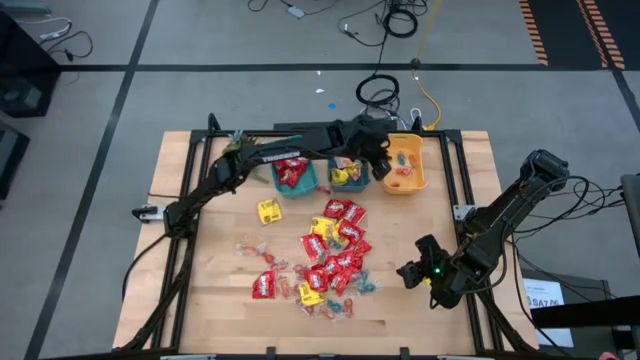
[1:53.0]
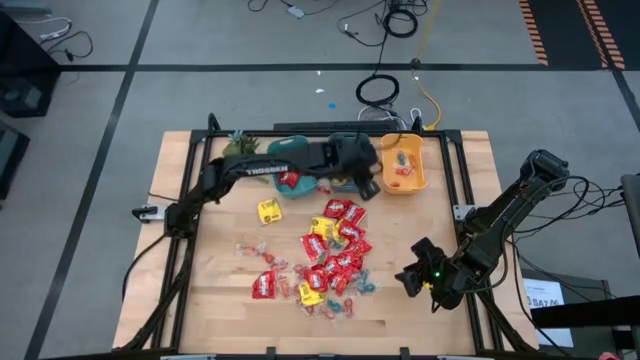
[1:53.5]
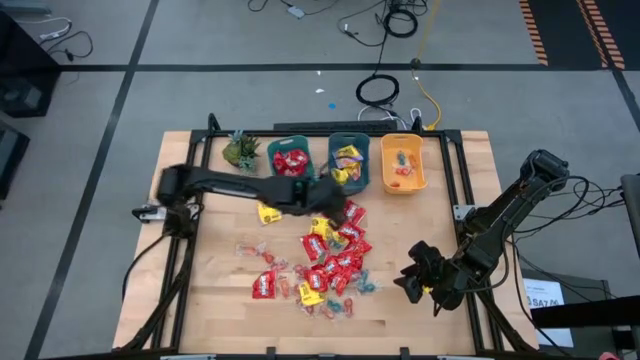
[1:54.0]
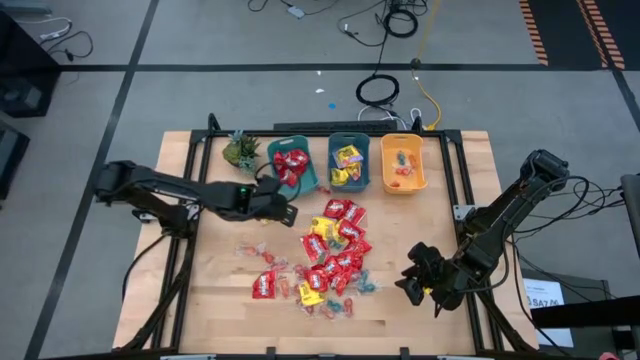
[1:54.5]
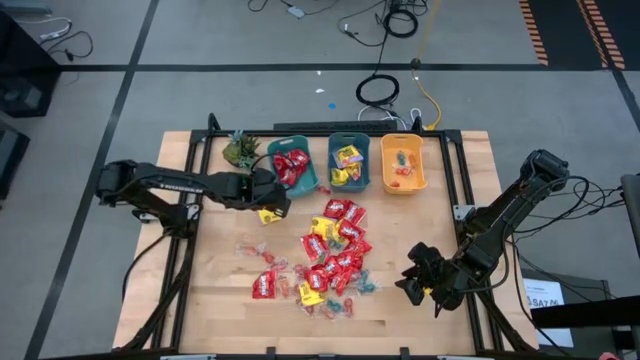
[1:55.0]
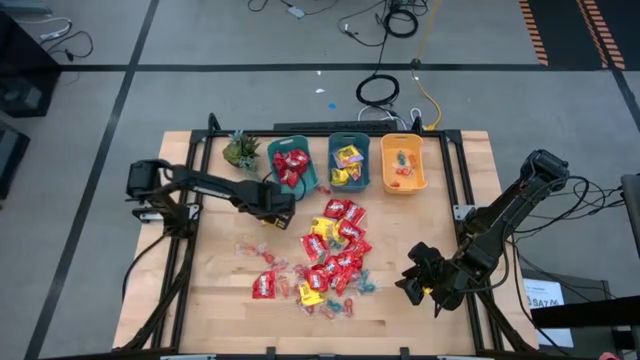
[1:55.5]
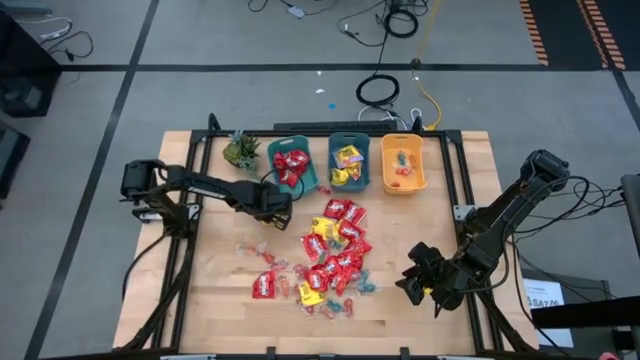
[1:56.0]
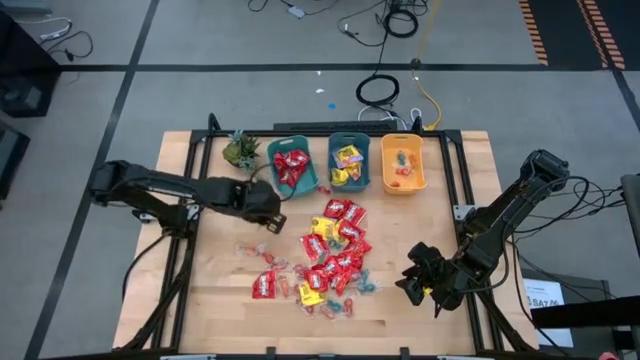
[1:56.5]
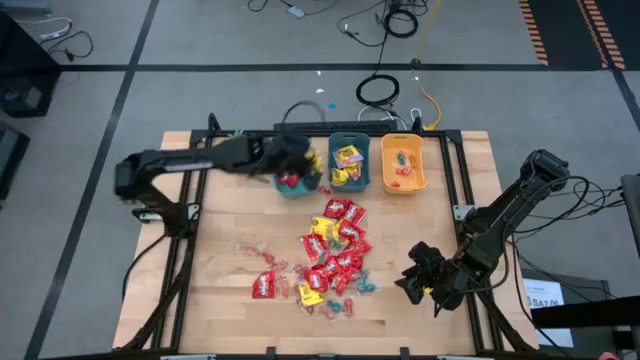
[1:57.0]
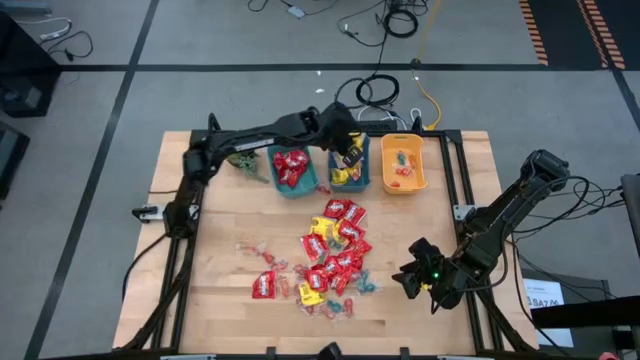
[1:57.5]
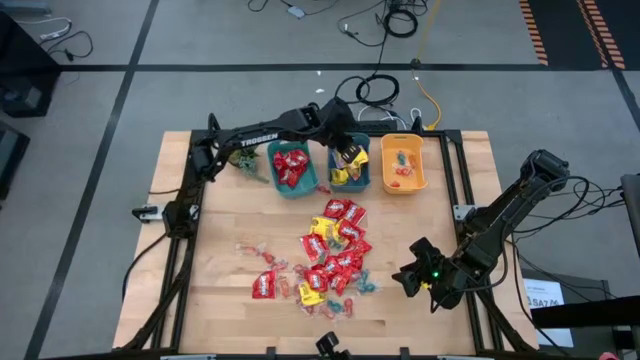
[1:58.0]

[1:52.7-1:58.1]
Task: Sort candy
Put the yellow candy into the blue bin

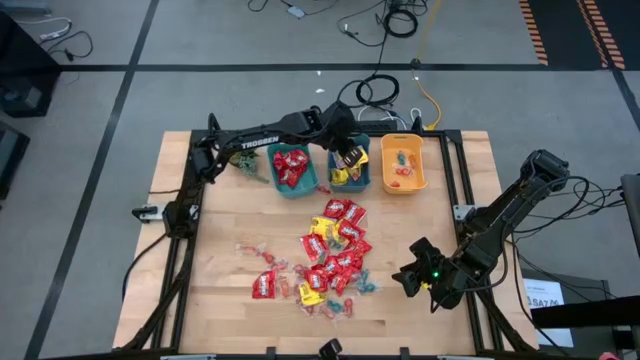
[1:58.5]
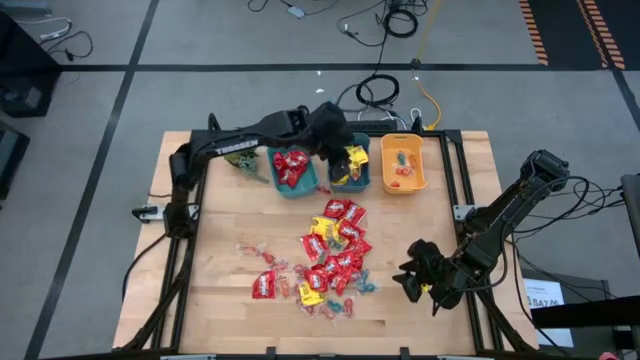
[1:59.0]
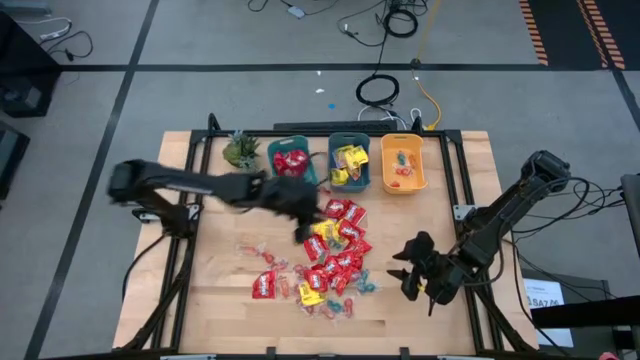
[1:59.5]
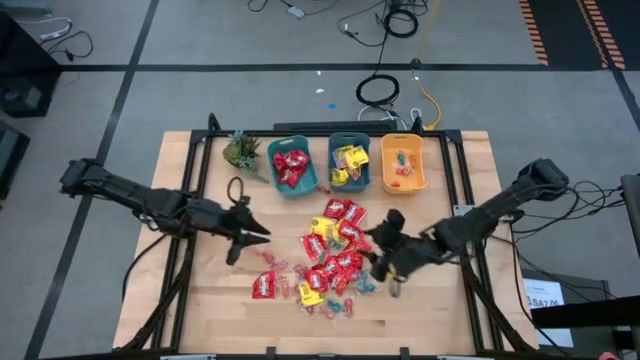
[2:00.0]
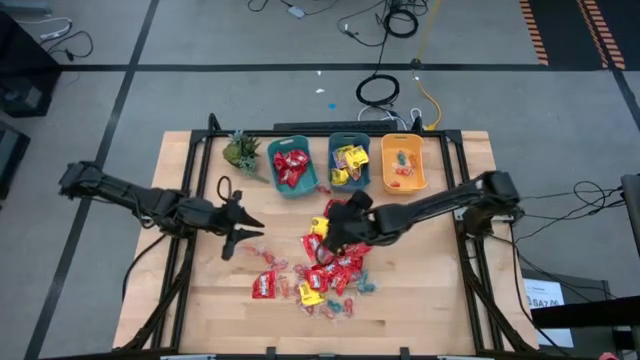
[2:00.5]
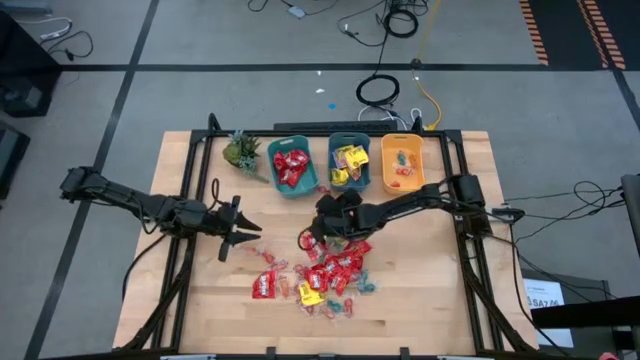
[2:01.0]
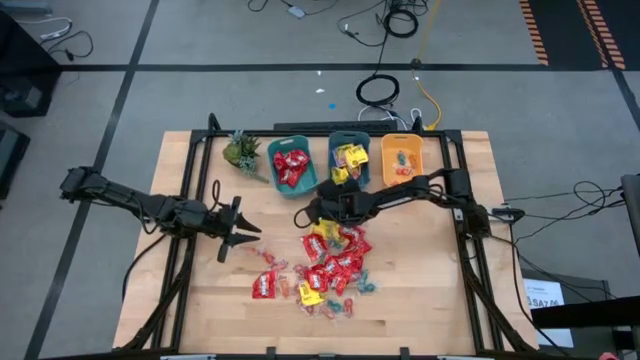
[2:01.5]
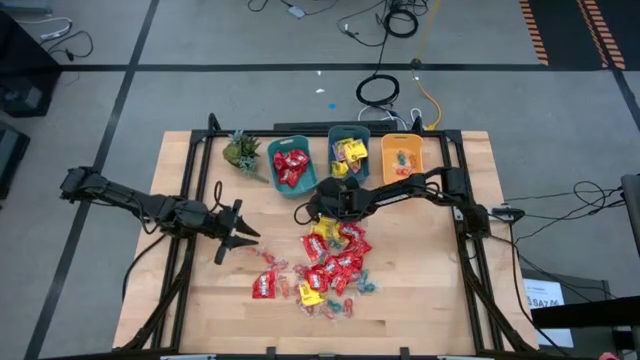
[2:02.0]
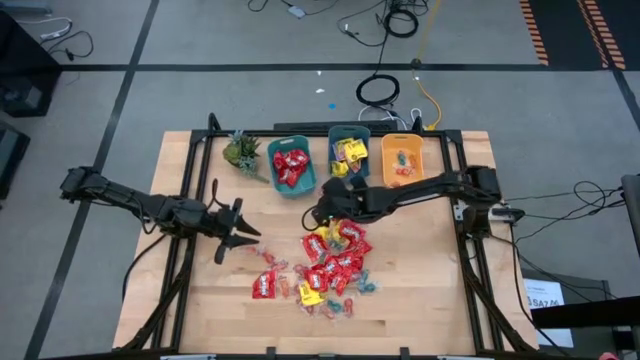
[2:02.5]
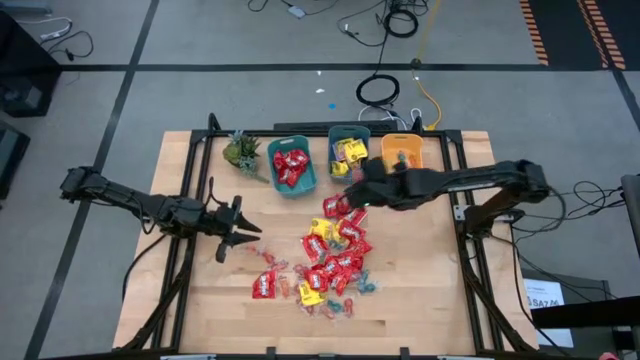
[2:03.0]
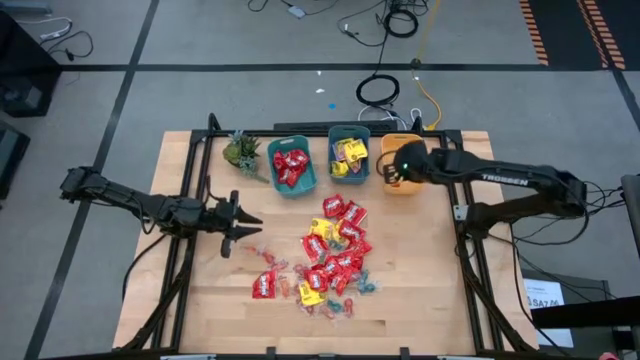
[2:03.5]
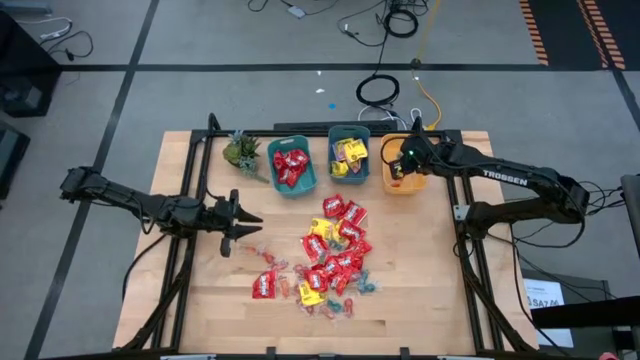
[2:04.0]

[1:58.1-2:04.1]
Put the red gummy candy into the yellow bin

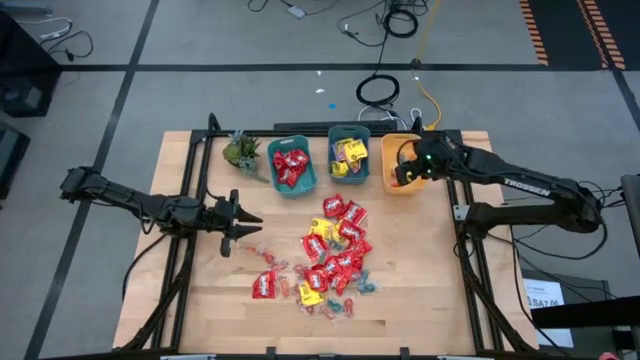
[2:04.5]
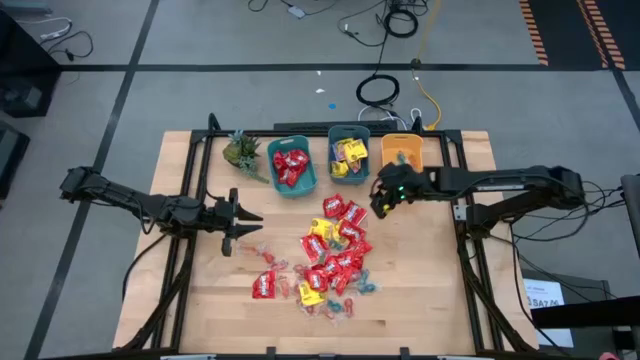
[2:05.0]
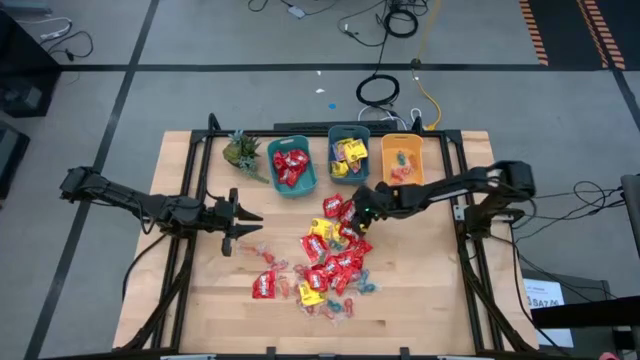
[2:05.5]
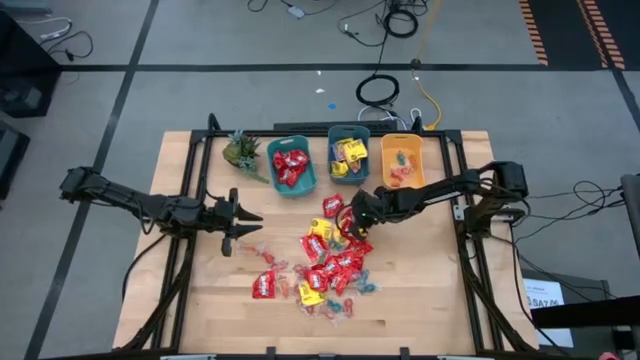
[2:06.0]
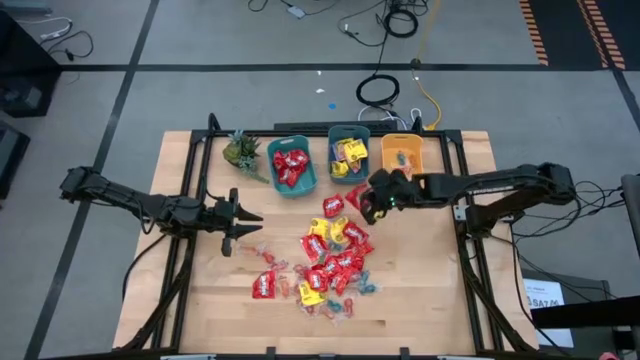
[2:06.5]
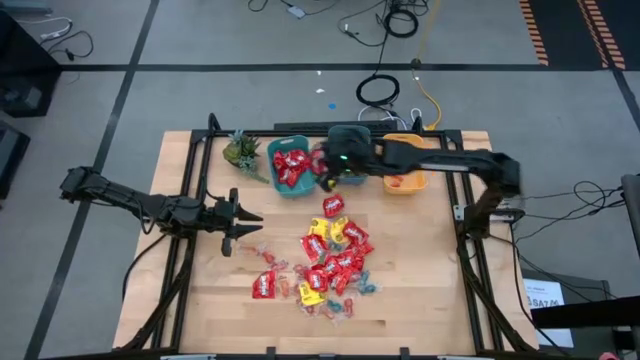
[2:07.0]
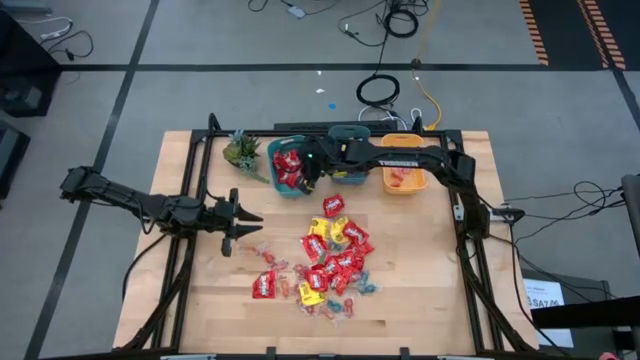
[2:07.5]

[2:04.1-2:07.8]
Put the red candy into the green bin

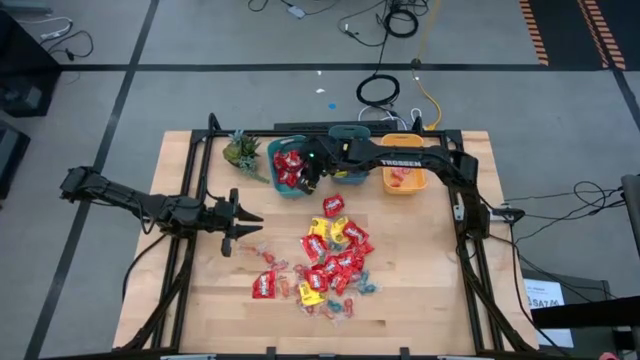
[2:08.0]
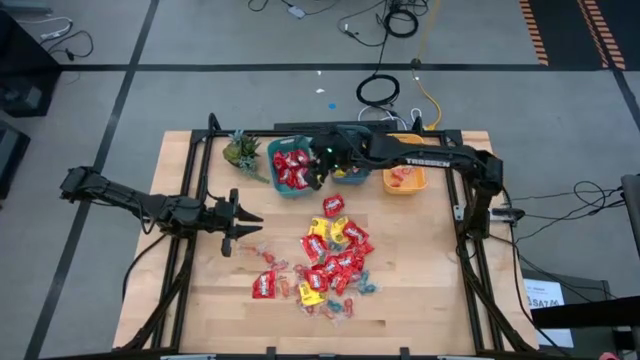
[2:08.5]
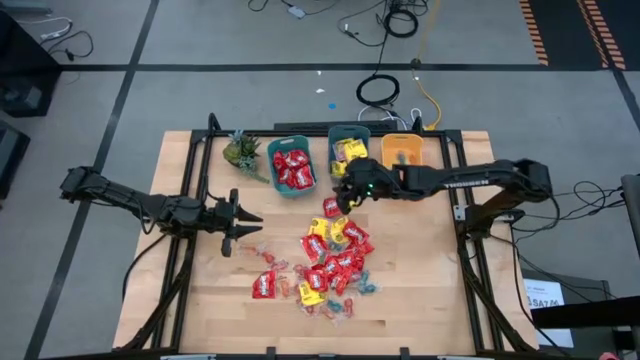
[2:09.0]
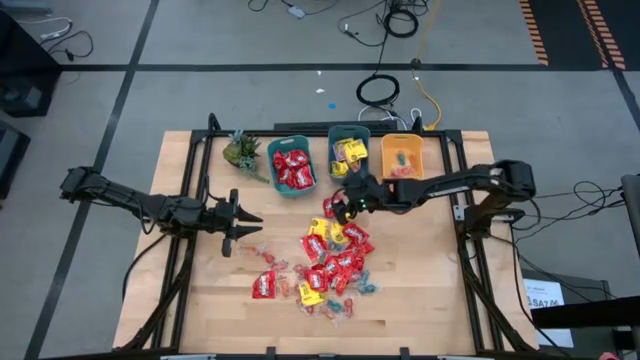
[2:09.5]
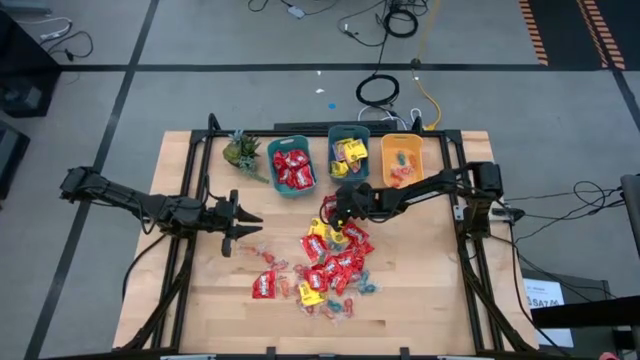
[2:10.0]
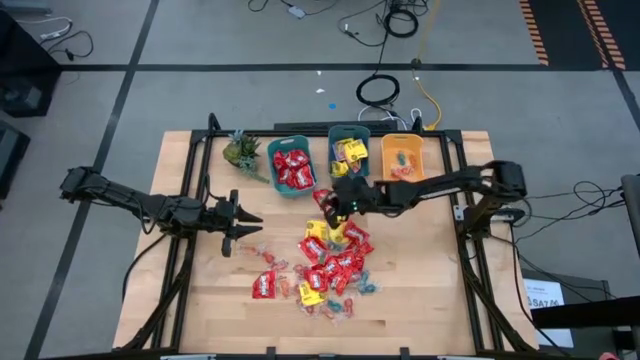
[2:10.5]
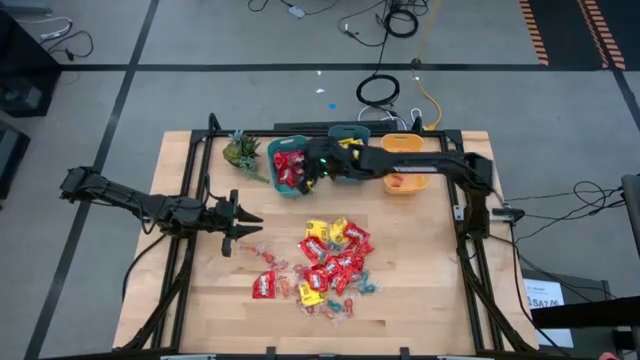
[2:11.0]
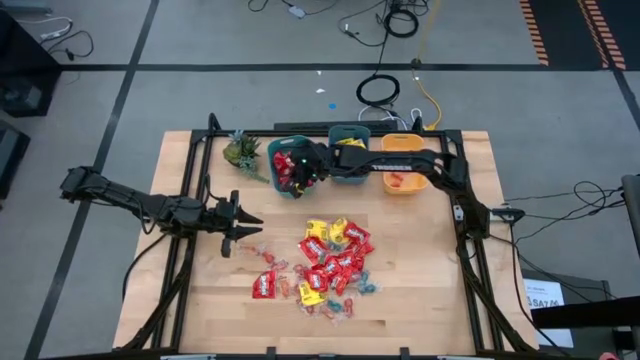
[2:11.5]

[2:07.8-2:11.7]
Put the red candy into the green bin

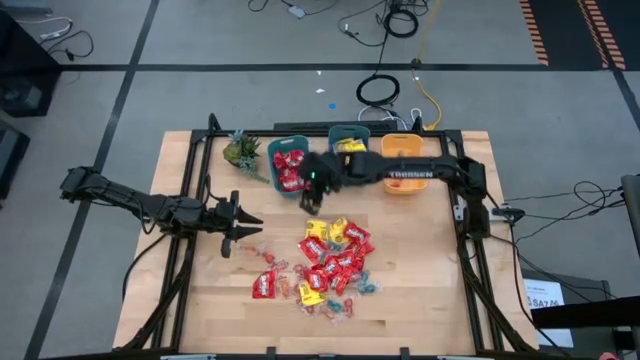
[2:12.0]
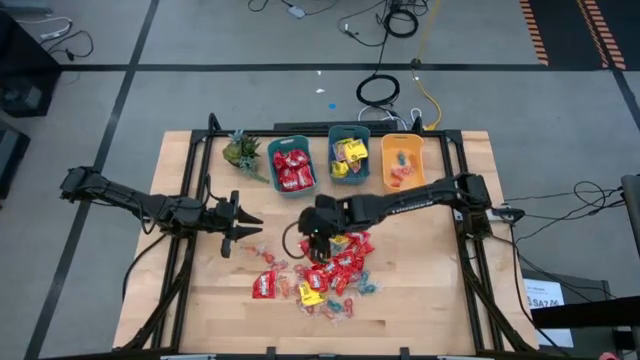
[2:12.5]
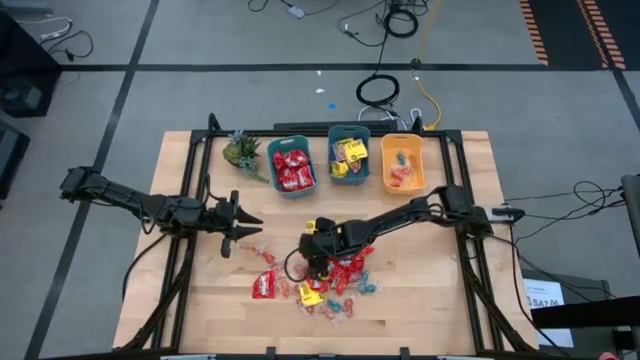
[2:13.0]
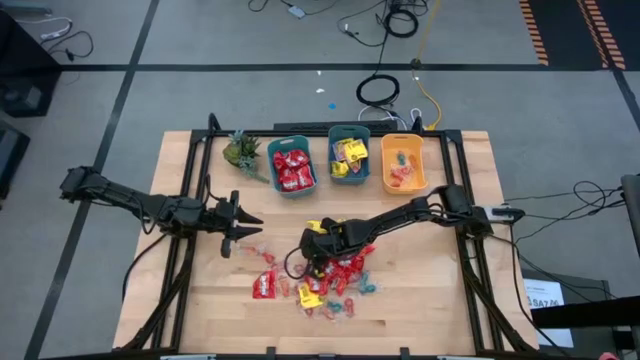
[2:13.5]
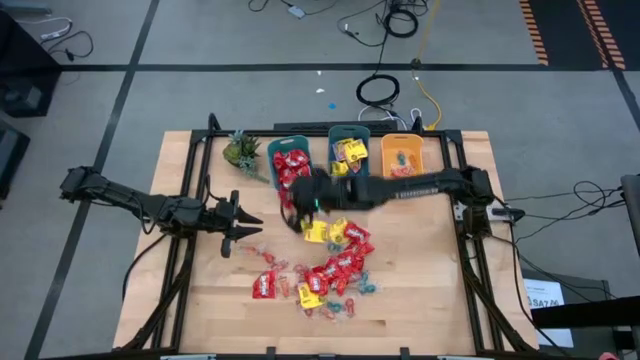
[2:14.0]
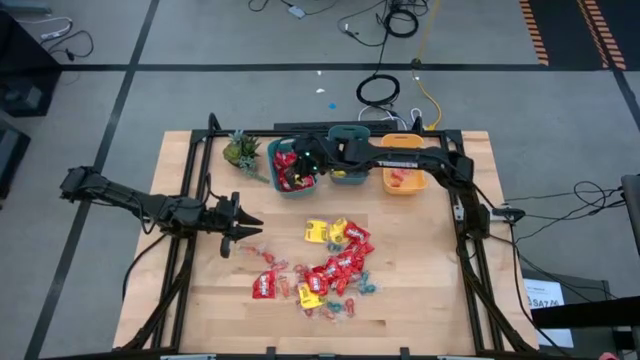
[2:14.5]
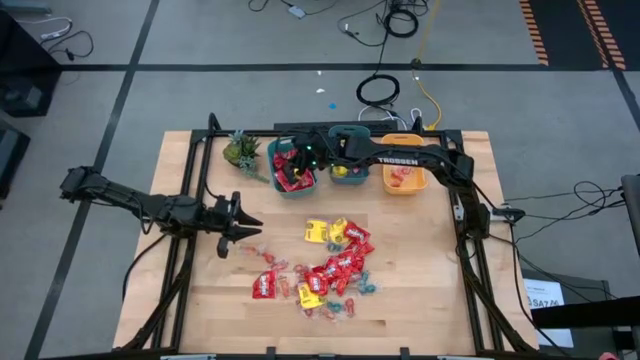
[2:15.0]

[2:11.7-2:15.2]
Put the red candy into the green bin
